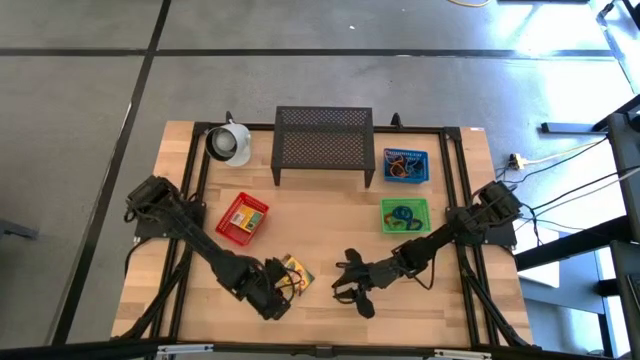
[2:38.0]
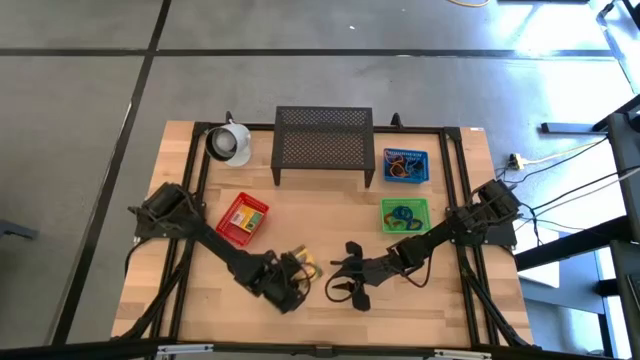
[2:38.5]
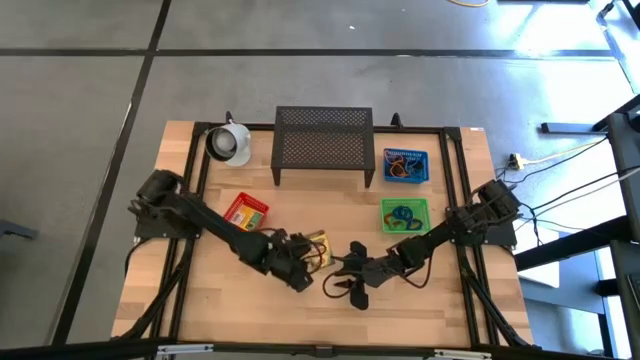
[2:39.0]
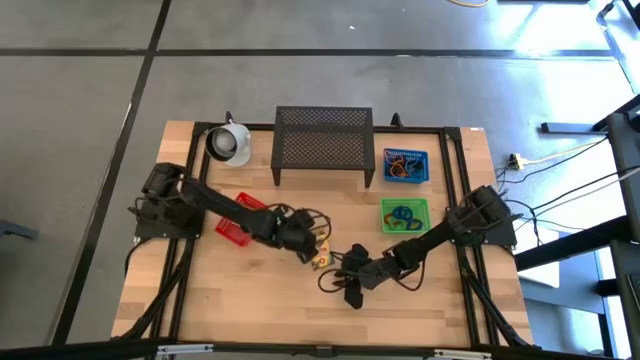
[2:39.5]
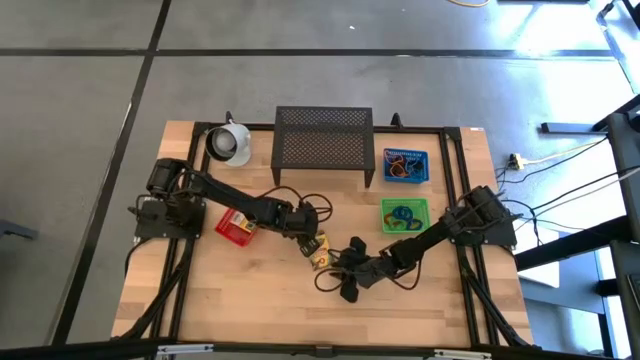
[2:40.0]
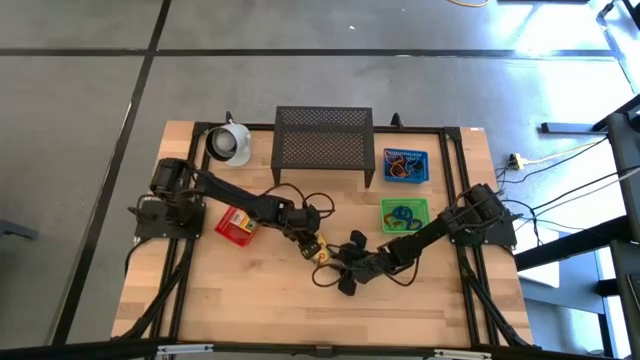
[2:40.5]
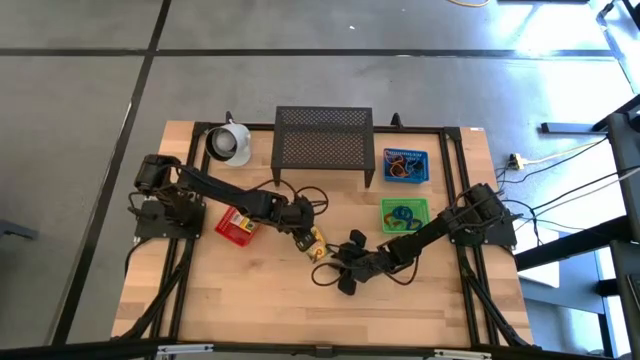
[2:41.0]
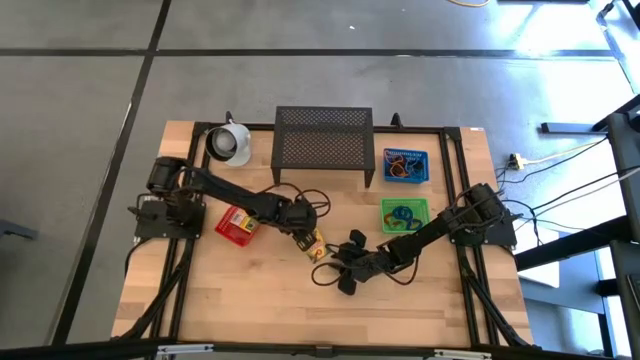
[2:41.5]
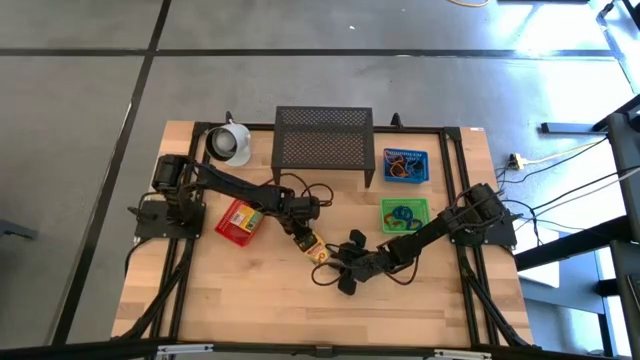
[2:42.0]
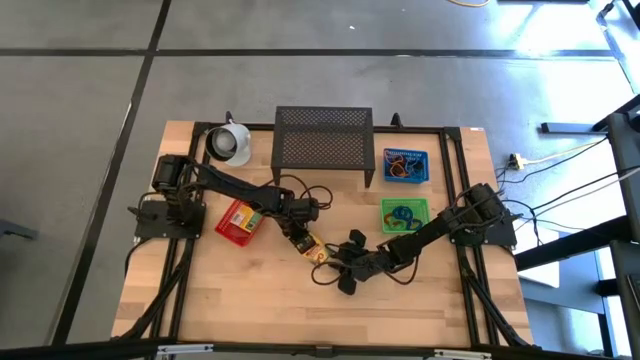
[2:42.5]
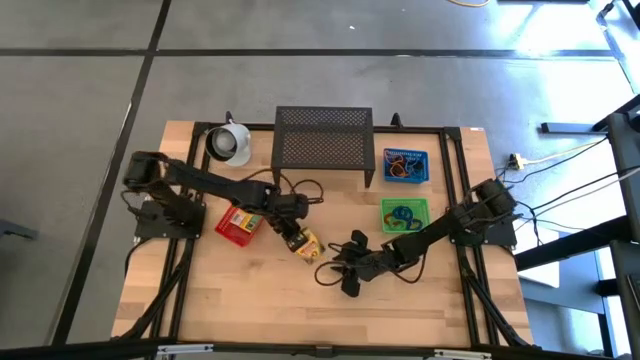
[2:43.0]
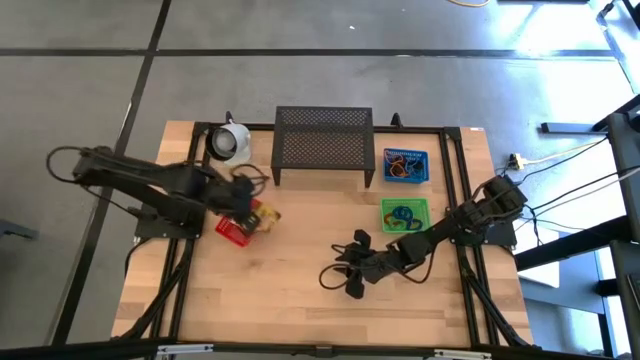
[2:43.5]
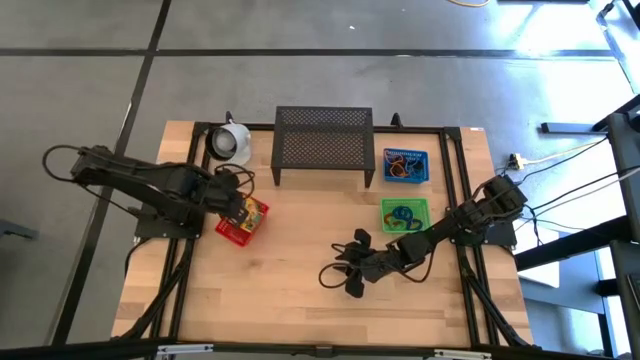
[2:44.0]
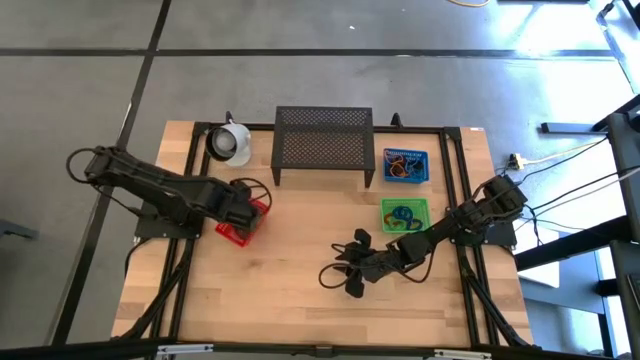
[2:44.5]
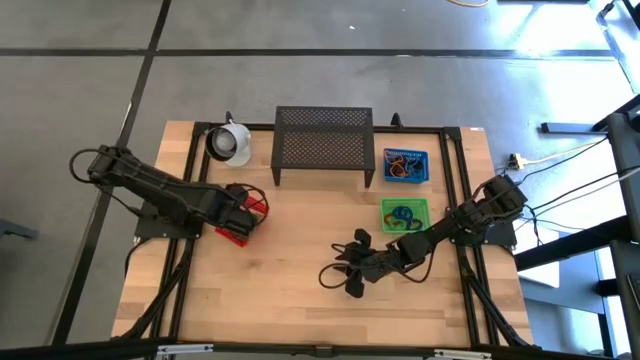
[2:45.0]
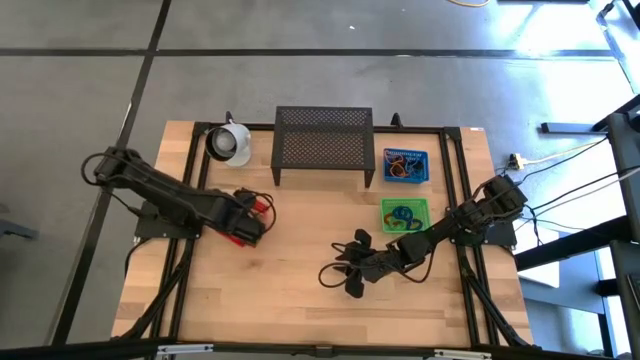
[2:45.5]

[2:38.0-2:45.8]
Task: Pick & Place Office Desk Supplies
Put the yellow crayon box into the red bin

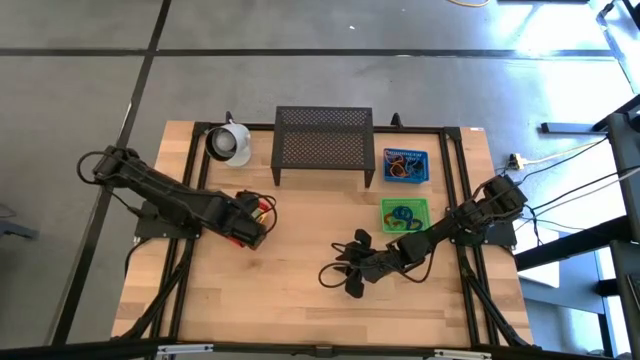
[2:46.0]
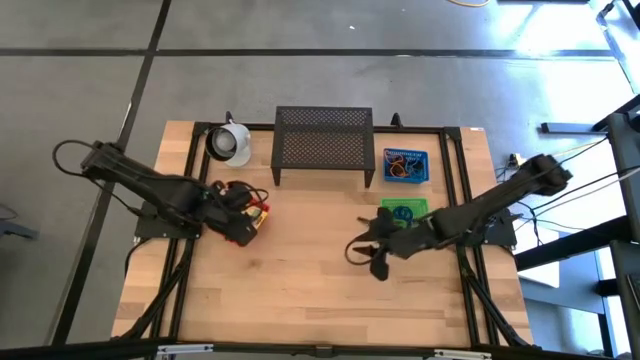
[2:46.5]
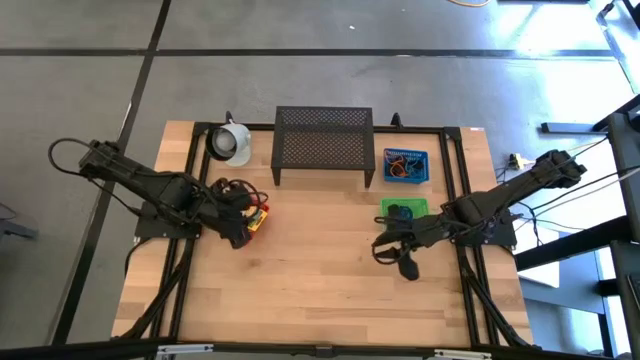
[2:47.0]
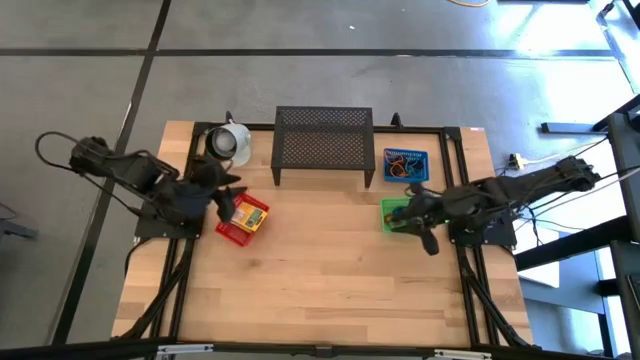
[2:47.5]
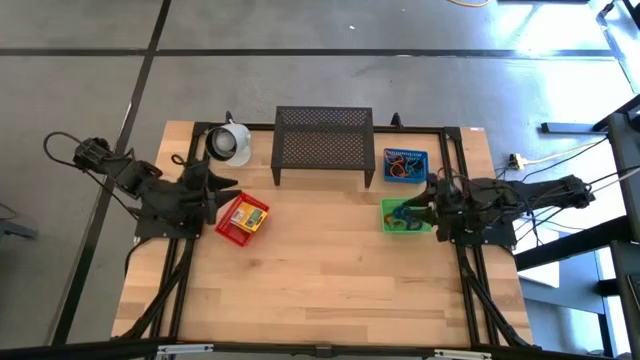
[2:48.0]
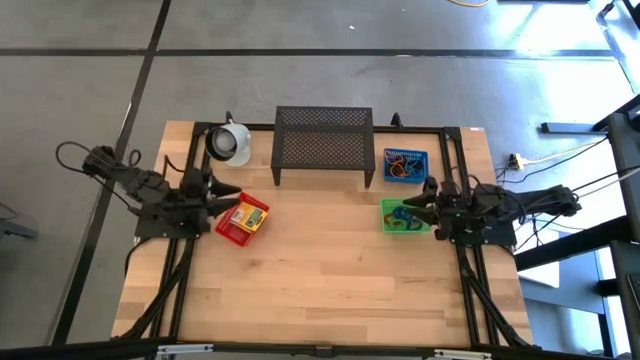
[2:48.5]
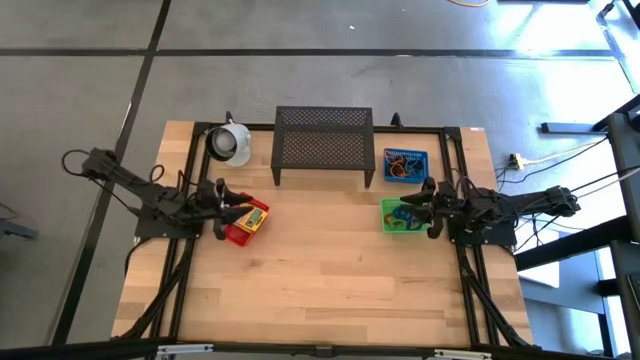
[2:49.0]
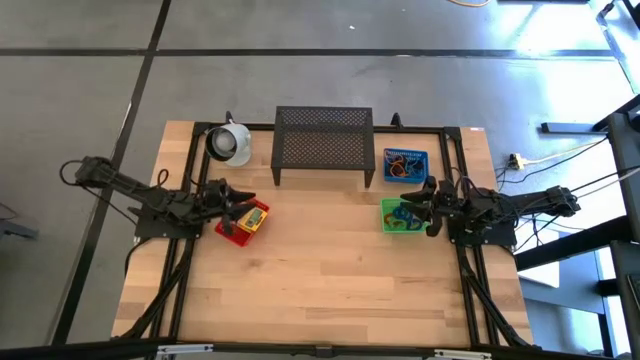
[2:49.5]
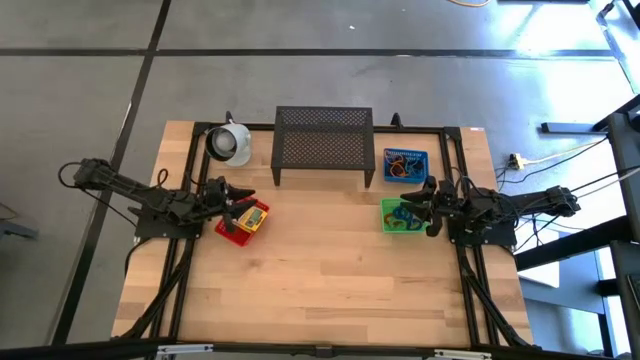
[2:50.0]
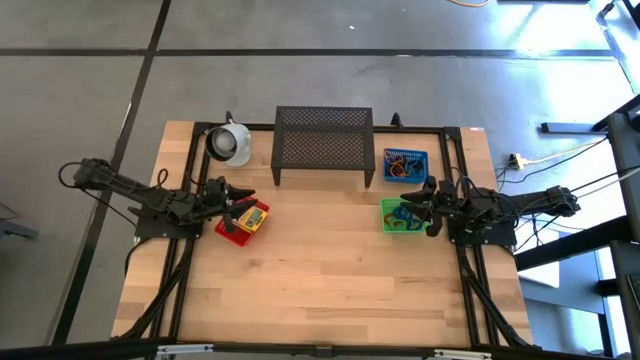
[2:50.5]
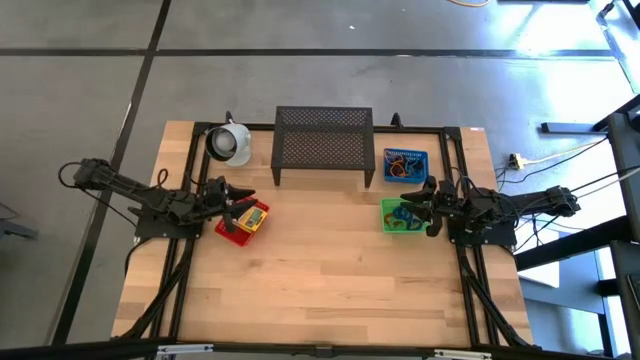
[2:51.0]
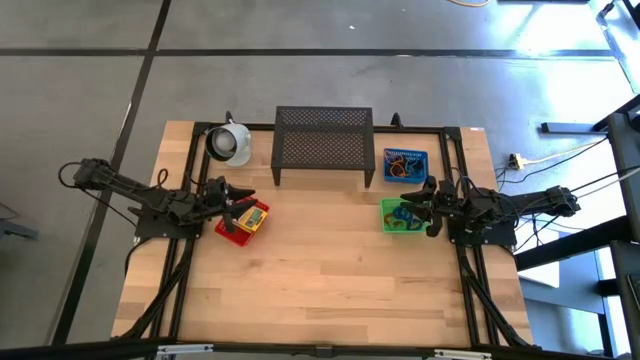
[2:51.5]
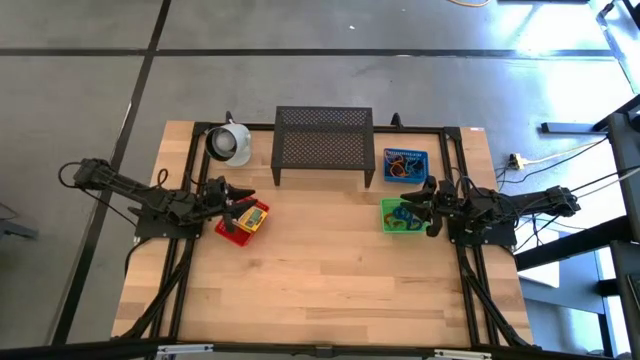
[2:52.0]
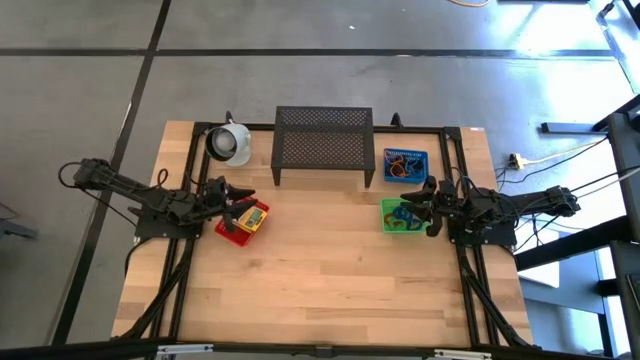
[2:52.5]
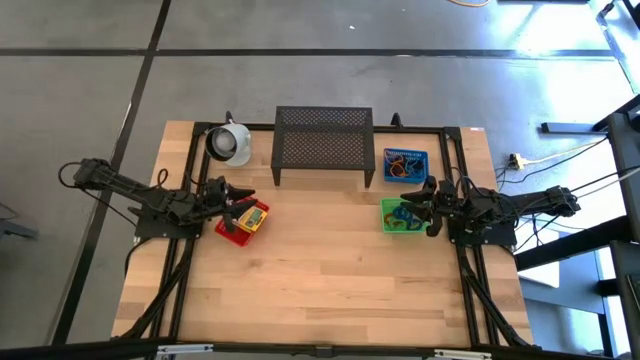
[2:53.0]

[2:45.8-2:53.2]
Return to Home Position

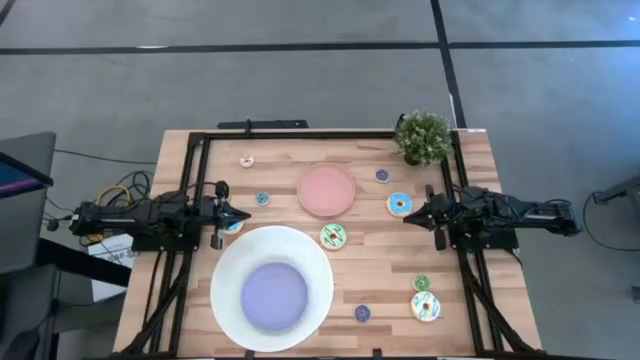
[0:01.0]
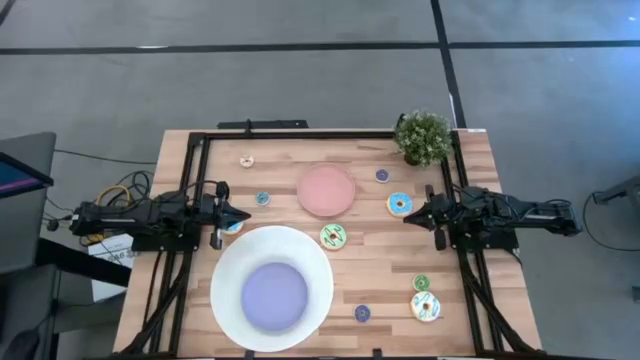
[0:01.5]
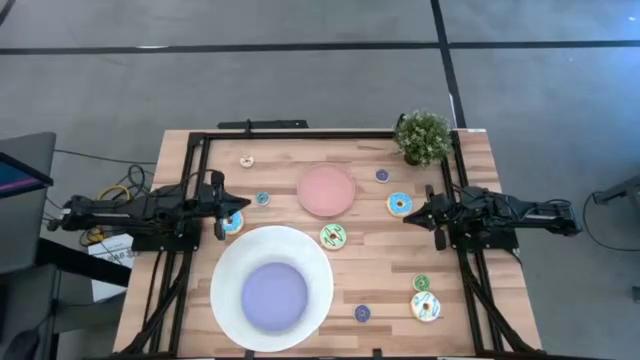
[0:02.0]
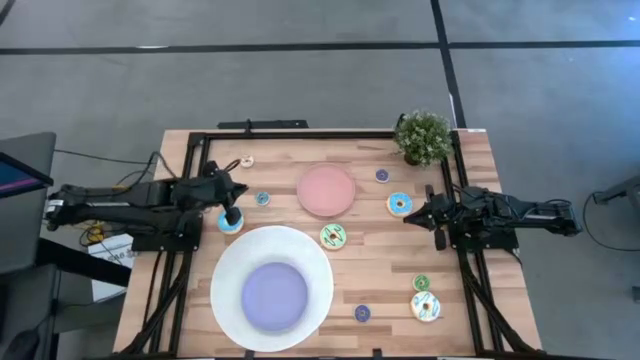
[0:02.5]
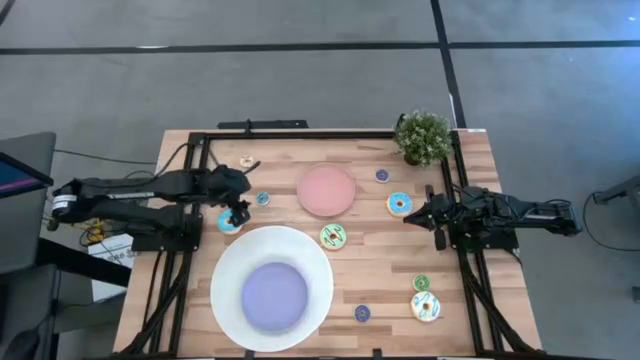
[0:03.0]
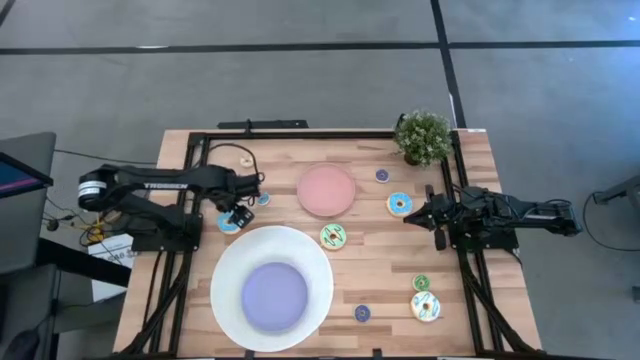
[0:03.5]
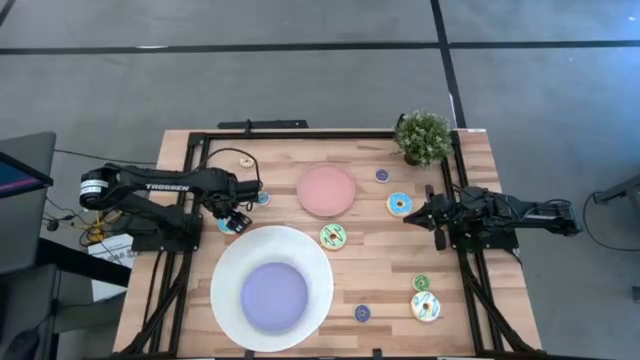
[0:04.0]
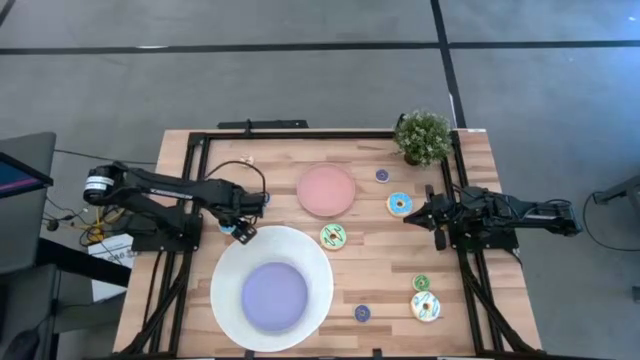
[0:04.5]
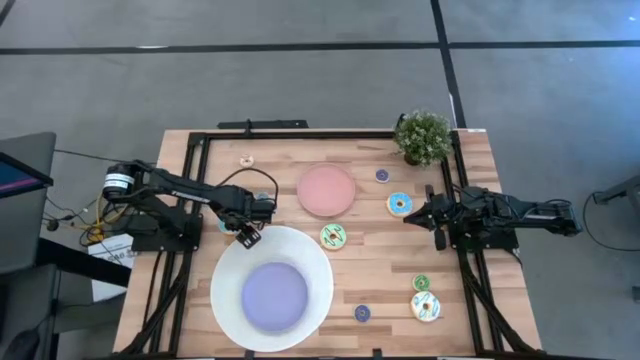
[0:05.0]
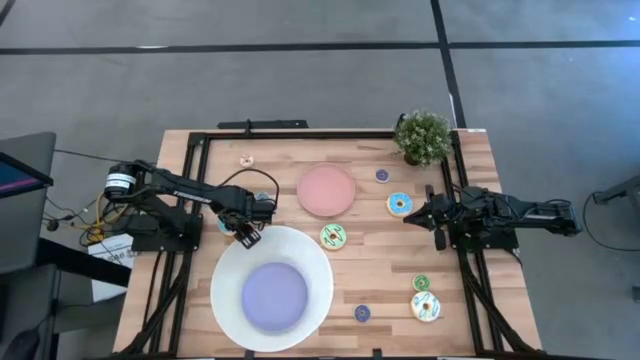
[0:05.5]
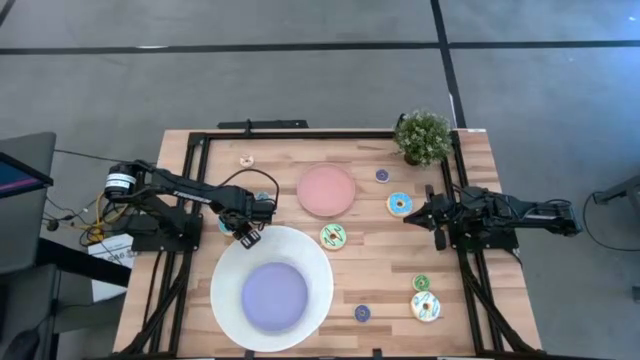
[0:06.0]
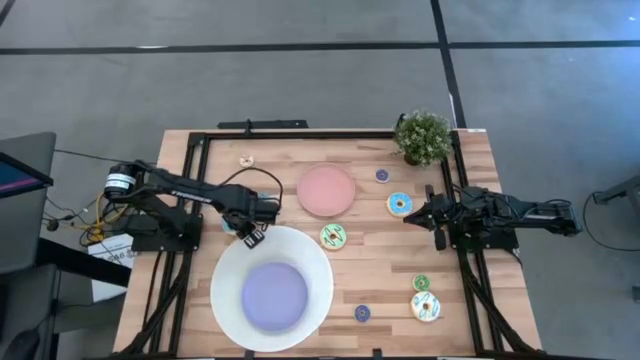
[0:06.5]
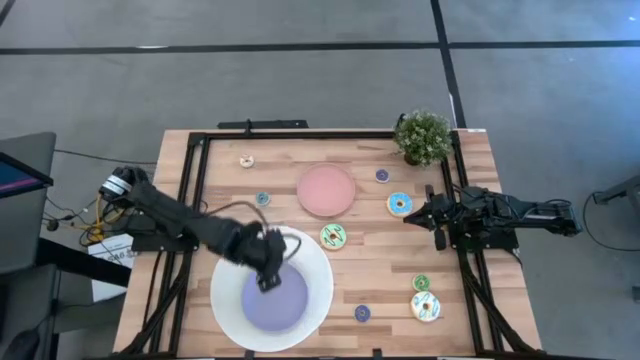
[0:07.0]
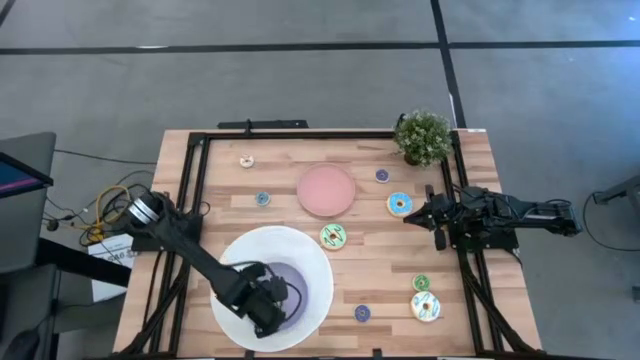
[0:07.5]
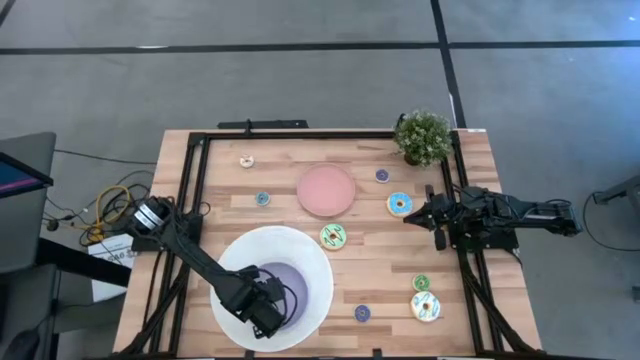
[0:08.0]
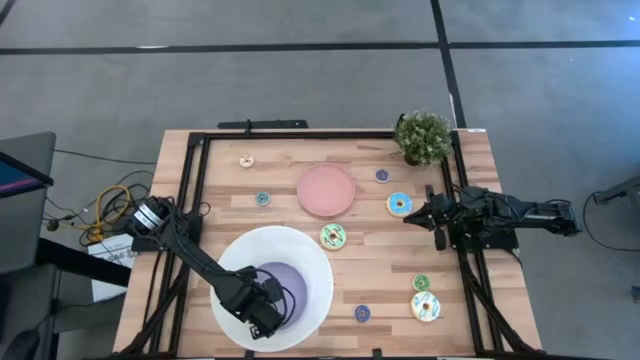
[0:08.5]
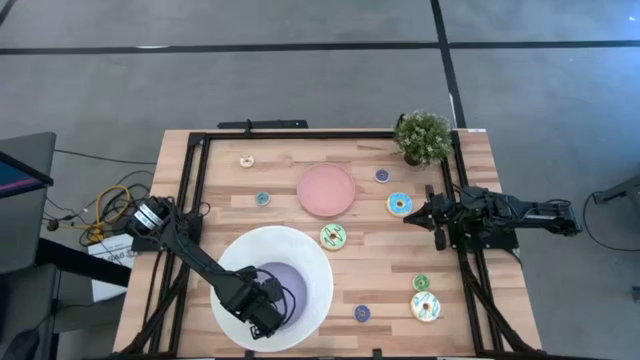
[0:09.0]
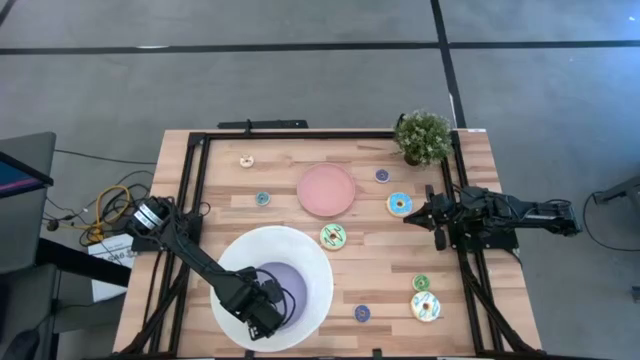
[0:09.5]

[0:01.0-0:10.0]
Task: Pick & Place donuts
Put the large left blue donut on the purple plate
